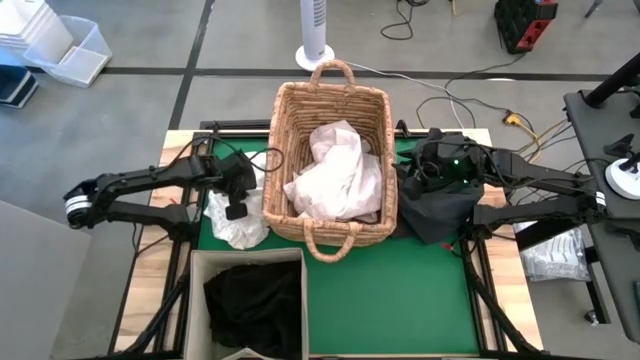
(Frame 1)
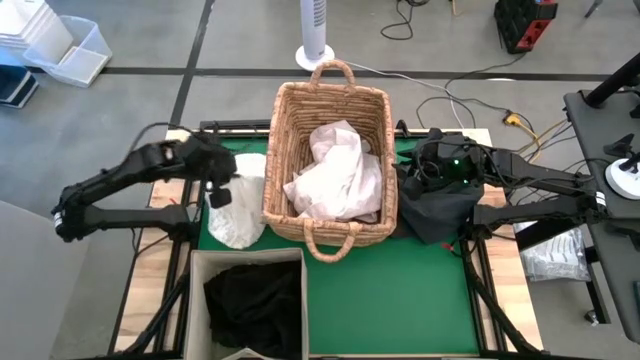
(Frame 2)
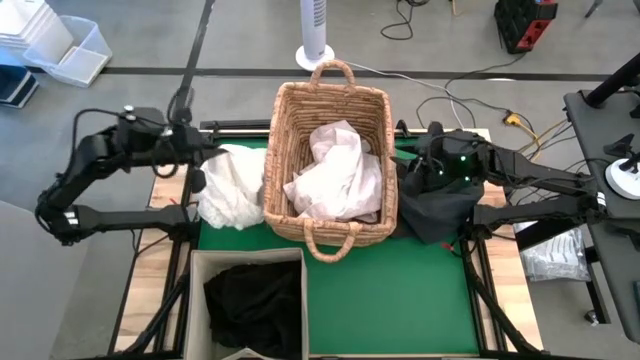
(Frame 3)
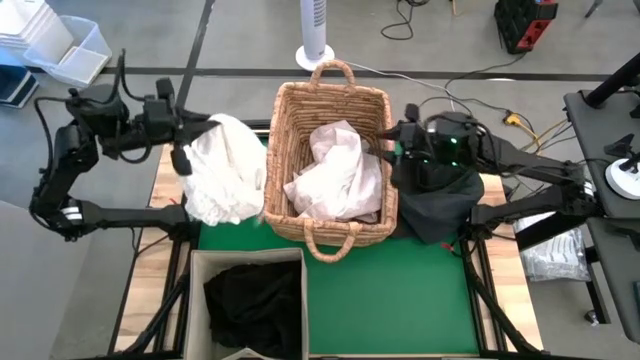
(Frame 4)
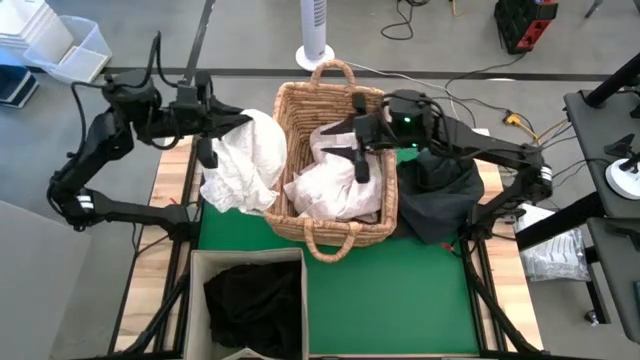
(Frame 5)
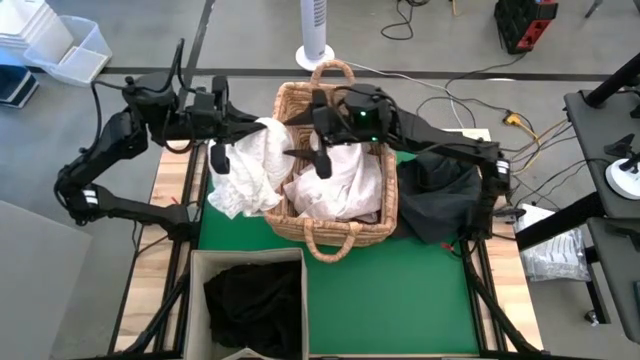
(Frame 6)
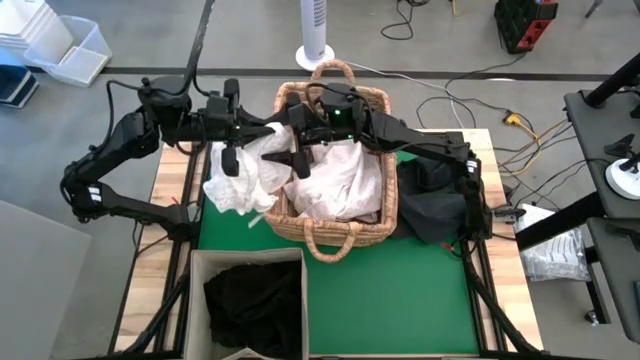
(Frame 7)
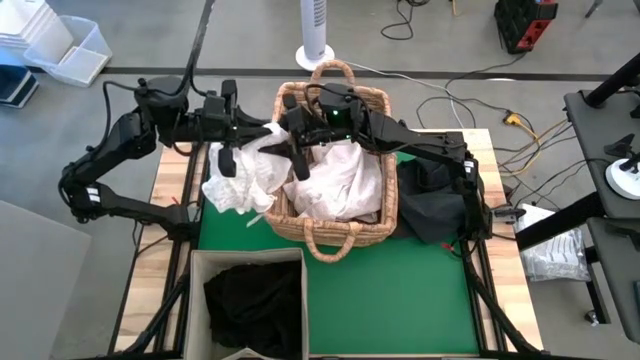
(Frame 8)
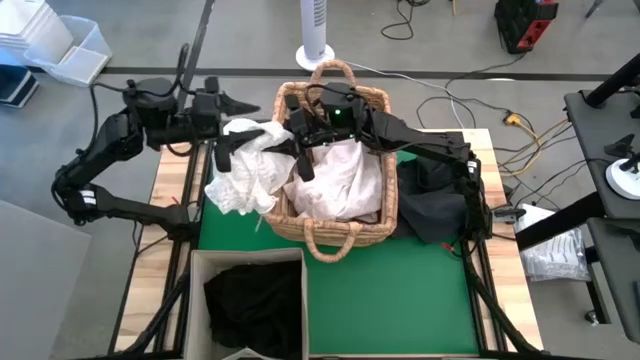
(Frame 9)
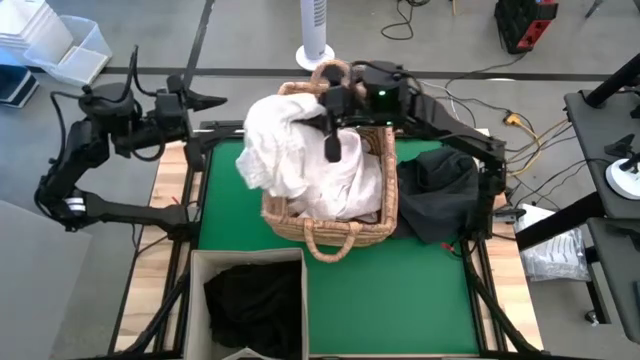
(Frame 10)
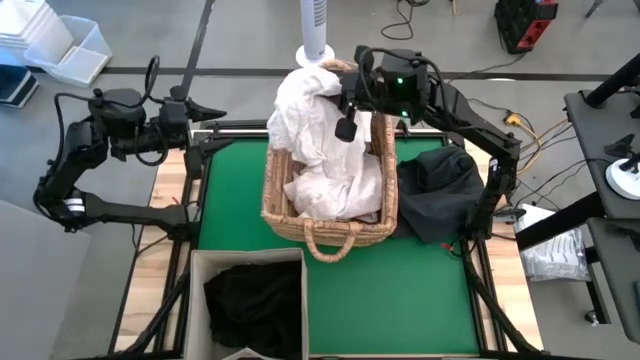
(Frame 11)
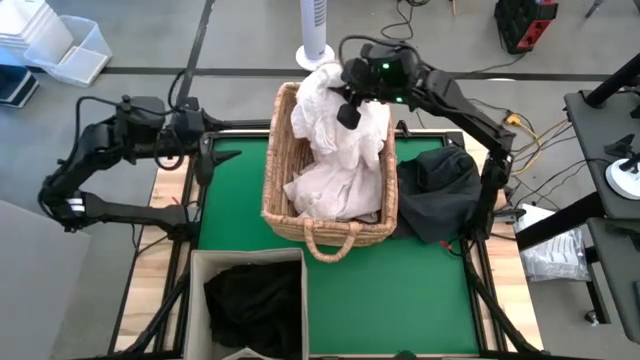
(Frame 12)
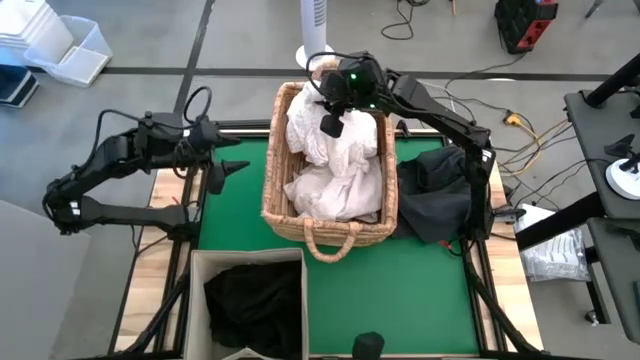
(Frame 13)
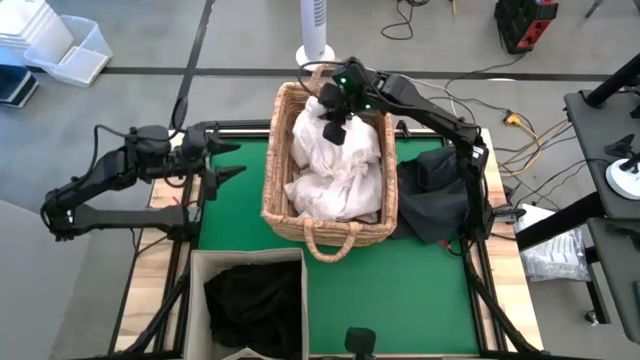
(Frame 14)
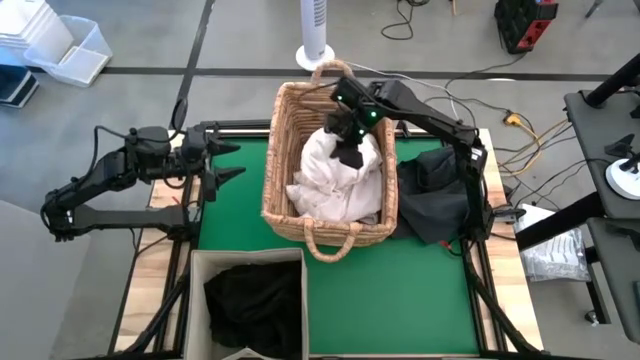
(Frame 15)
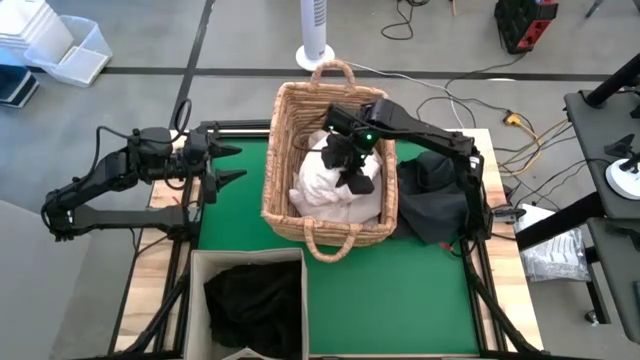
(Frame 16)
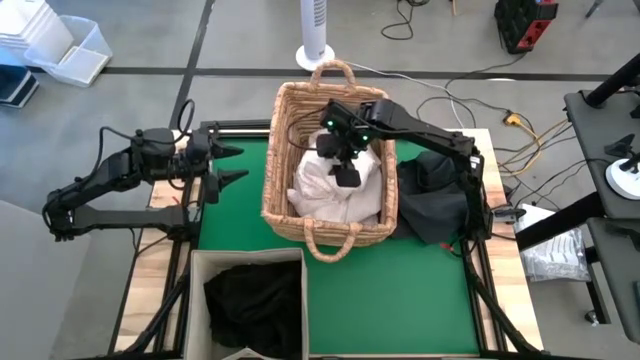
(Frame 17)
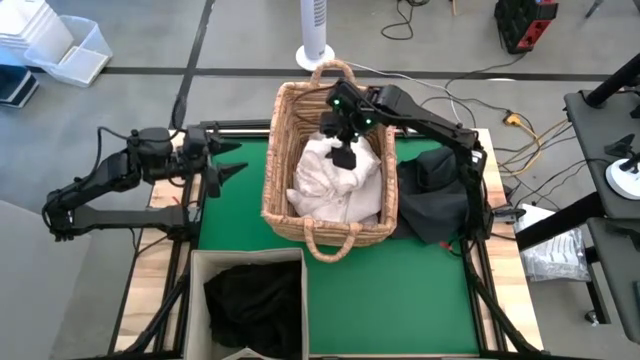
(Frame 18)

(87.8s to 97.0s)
Put the white shirt into the brown laundry bin
